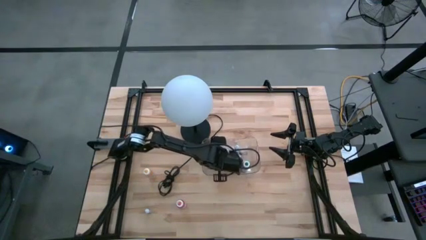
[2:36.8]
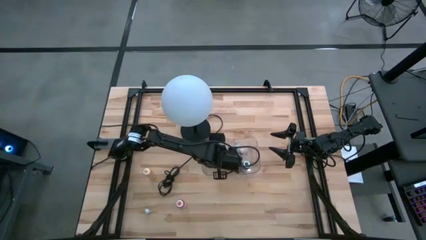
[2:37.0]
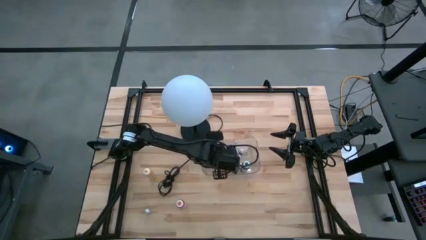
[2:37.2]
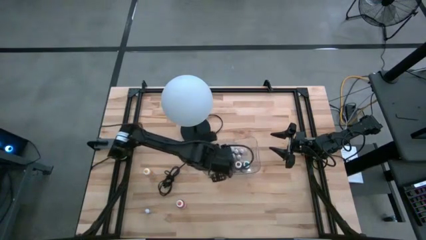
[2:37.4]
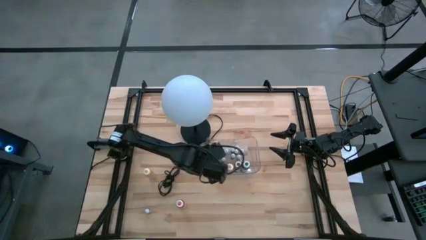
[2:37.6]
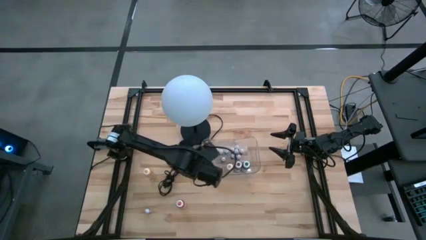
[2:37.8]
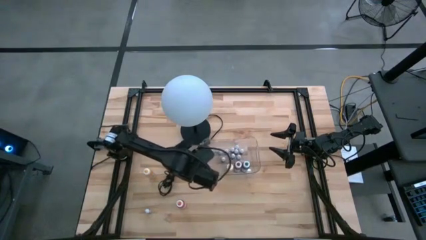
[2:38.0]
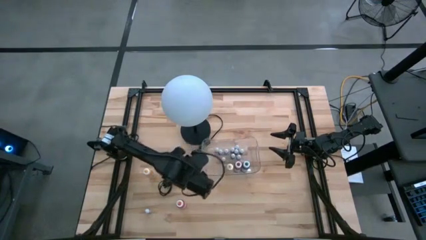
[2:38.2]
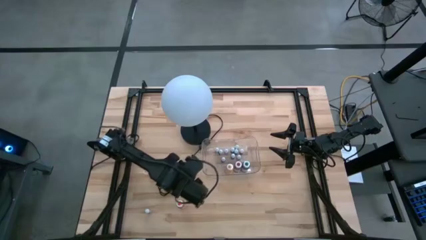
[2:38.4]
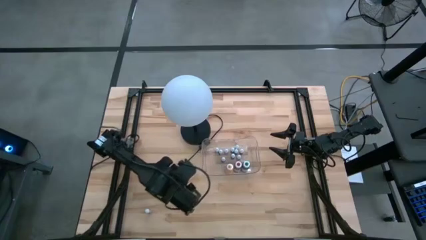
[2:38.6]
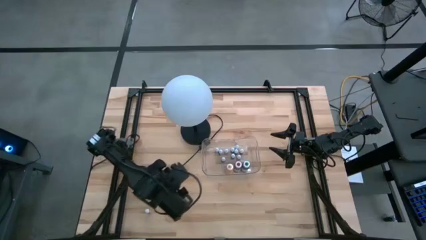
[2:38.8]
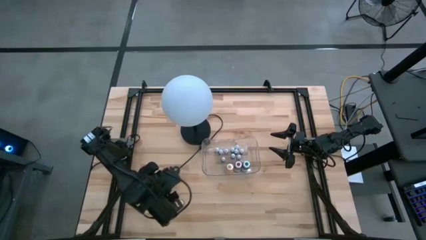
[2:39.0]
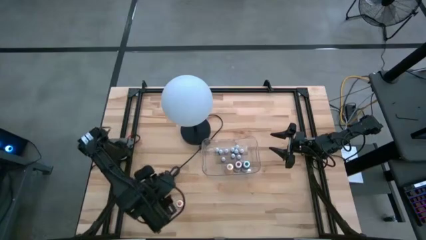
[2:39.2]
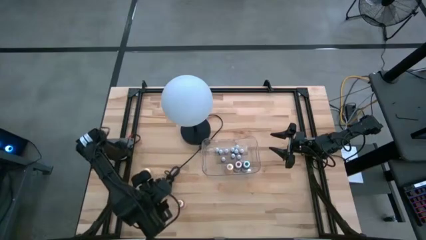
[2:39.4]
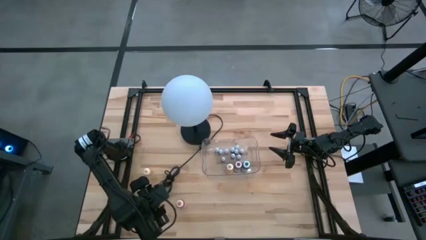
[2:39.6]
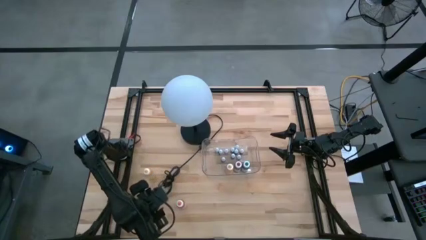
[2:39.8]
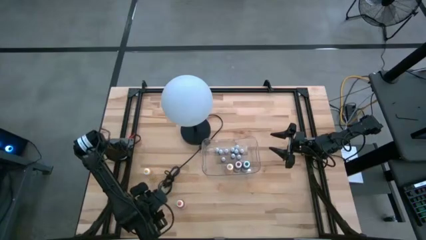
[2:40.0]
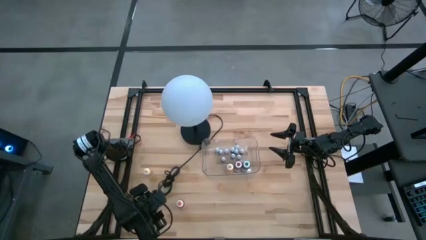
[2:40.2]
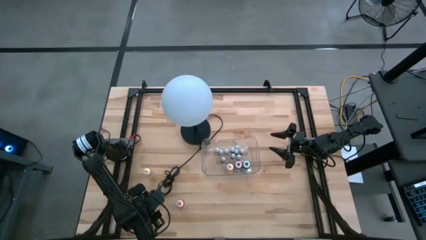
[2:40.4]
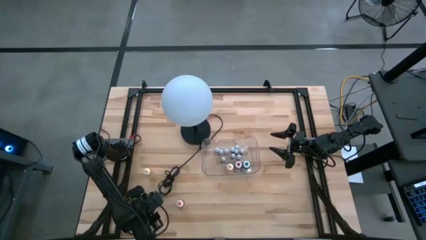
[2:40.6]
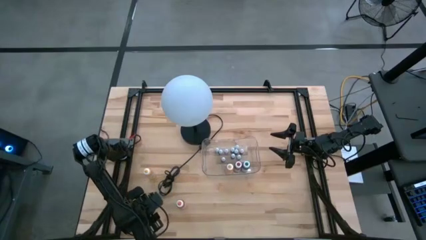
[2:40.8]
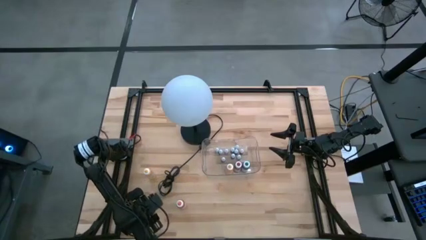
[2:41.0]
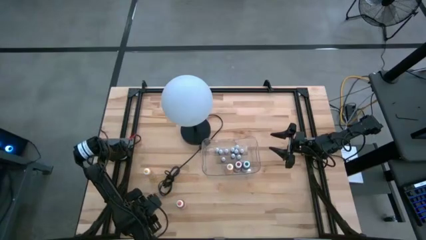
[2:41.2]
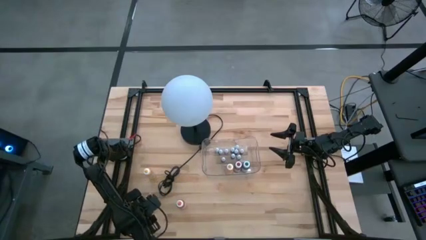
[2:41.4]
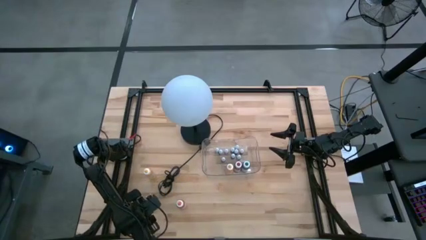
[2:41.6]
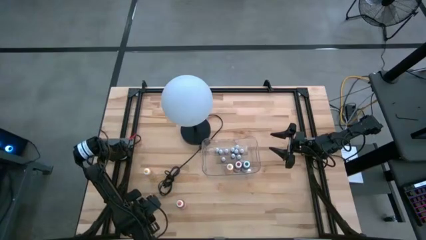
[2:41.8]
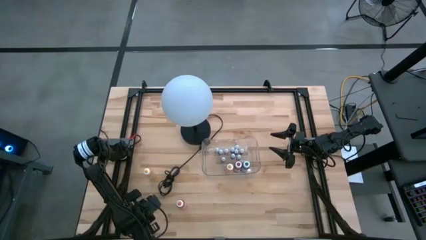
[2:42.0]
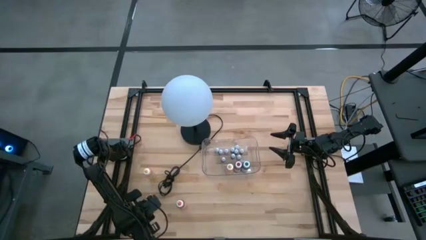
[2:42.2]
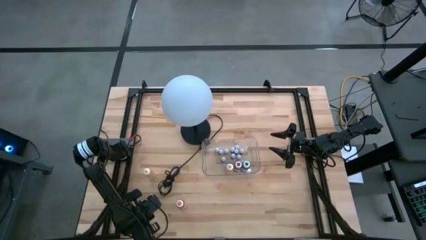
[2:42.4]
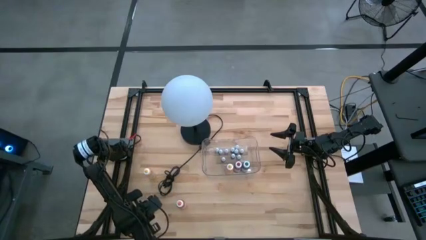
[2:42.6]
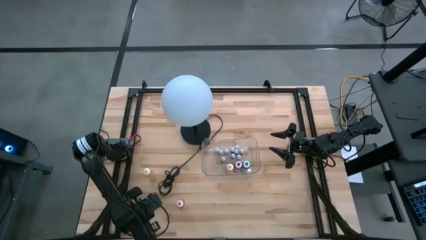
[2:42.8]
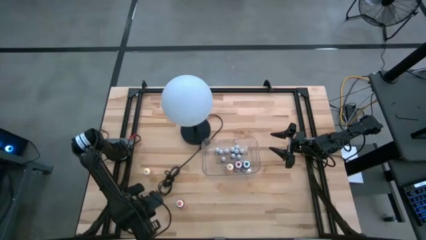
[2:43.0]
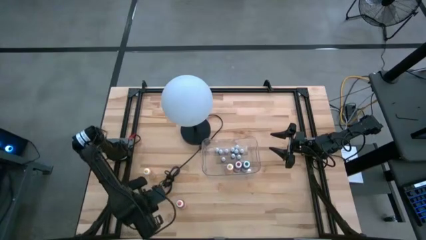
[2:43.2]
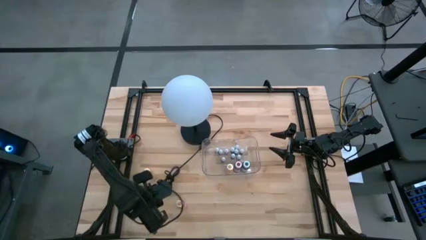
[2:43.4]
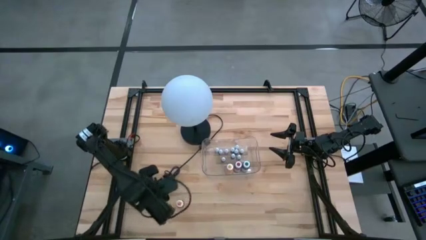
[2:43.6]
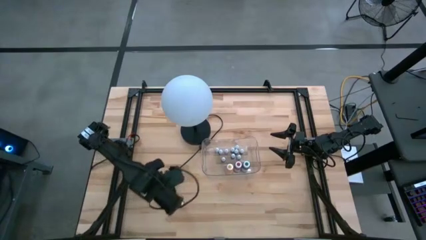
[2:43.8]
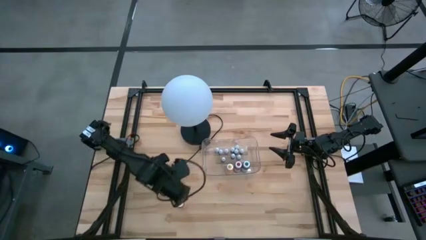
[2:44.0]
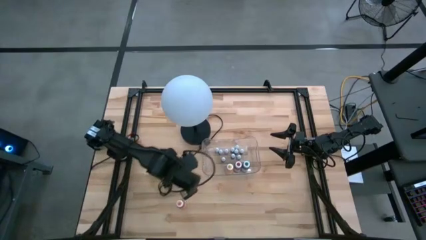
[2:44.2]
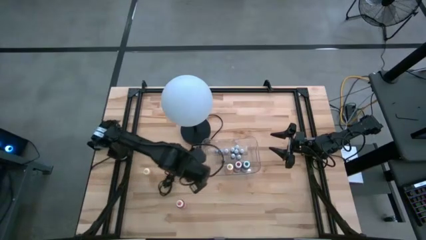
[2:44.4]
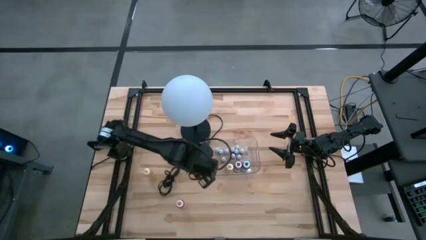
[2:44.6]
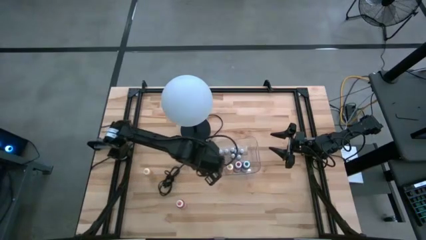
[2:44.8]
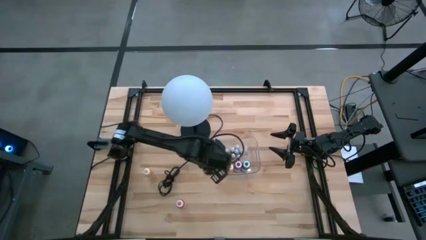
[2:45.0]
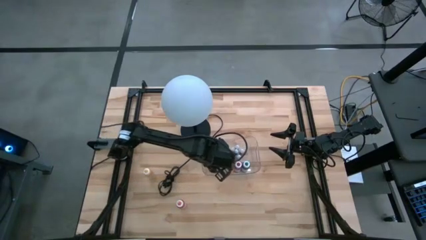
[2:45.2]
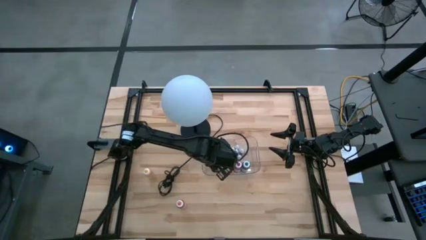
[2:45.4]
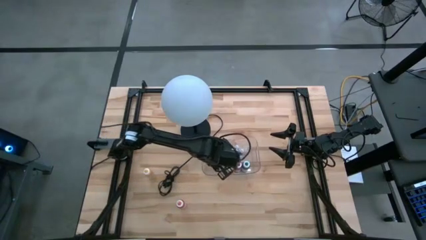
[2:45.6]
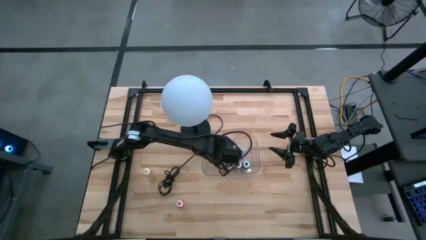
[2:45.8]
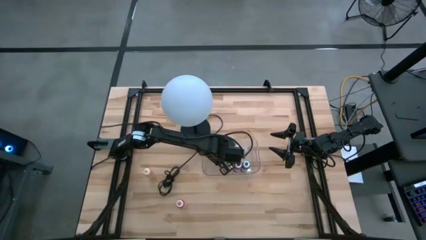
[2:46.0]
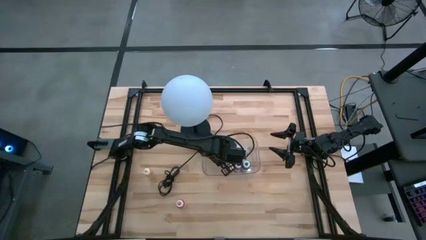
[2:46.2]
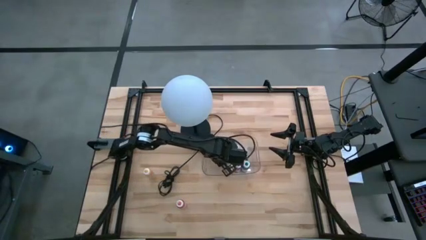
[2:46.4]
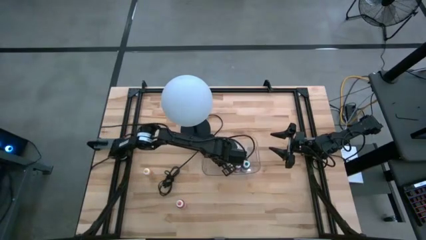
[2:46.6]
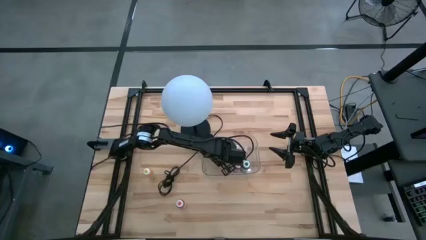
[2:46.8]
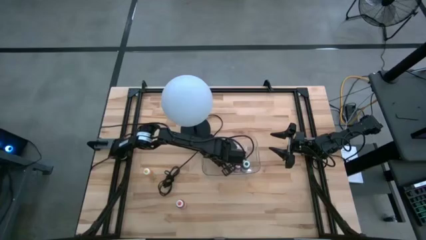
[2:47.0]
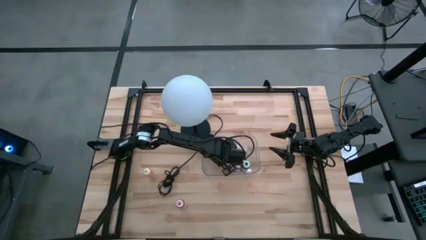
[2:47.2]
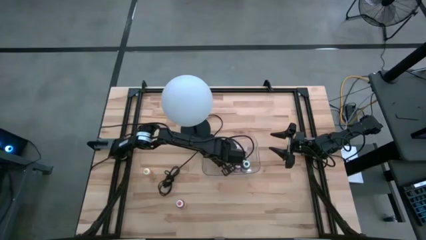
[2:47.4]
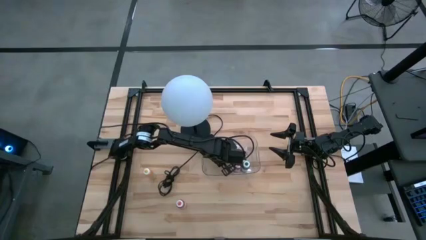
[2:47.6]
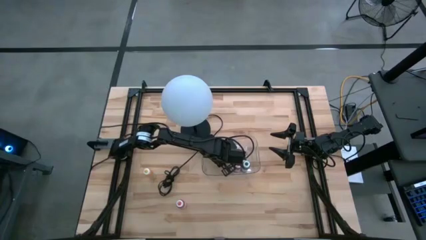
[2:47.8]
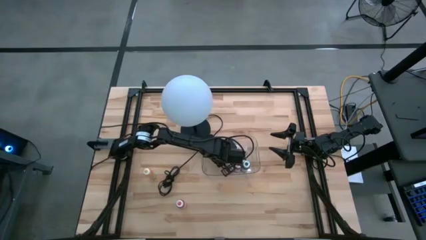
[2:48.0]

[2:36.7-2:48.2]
Task: Pick & Place food coloring
Put the small brown food coloring bottle into the transparent bin
